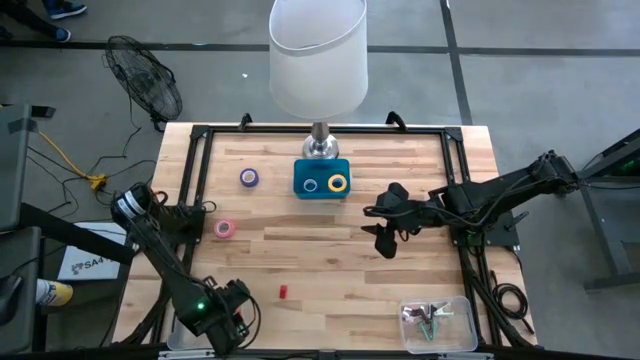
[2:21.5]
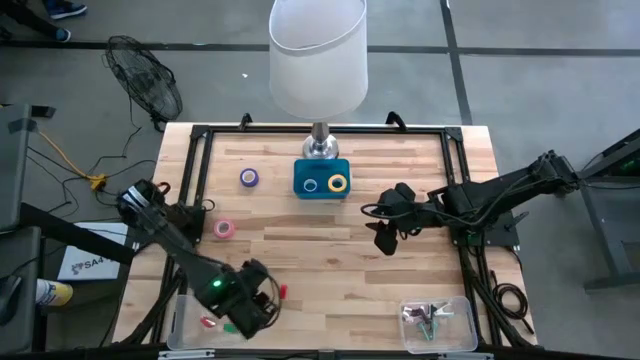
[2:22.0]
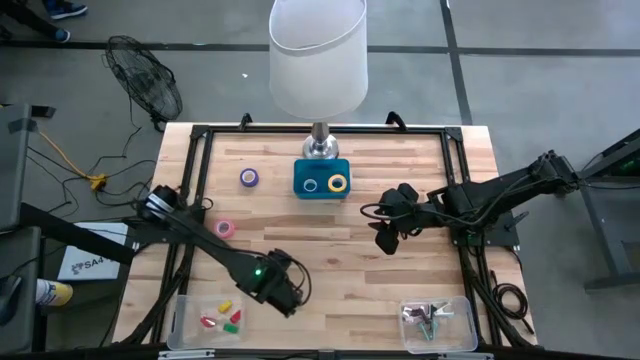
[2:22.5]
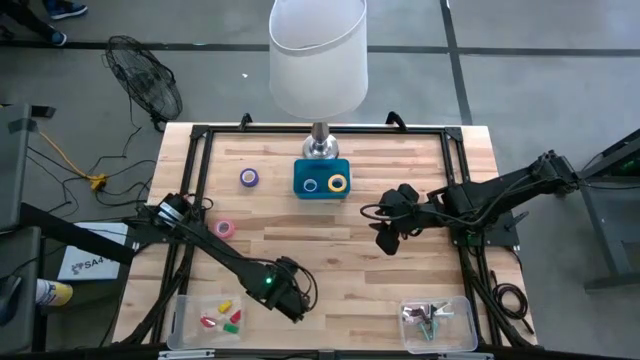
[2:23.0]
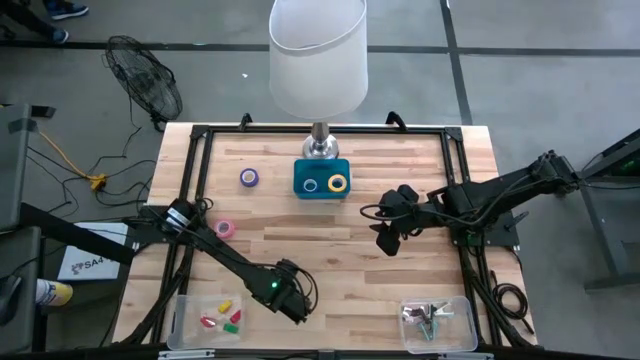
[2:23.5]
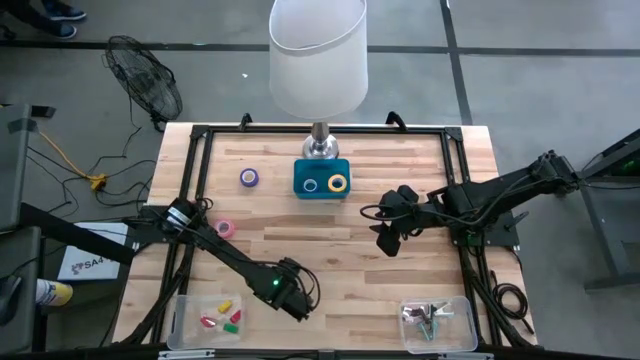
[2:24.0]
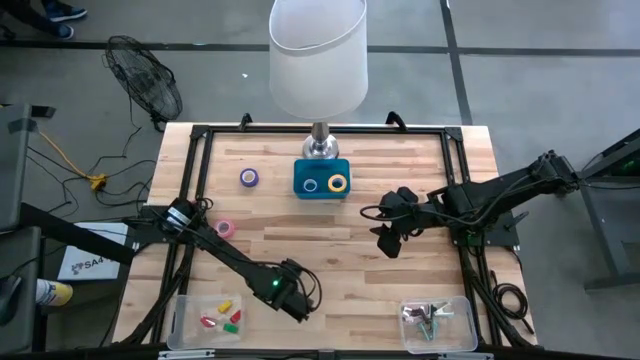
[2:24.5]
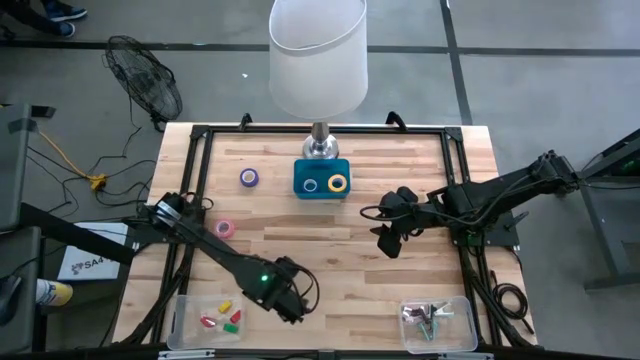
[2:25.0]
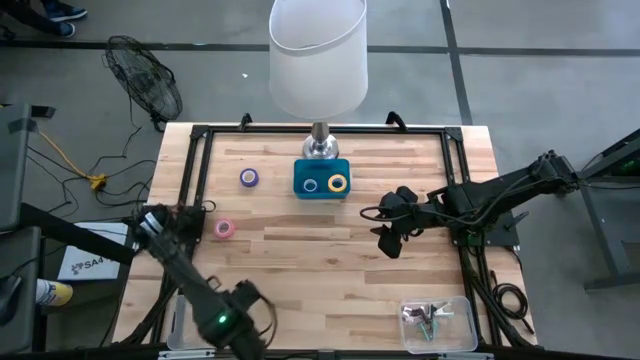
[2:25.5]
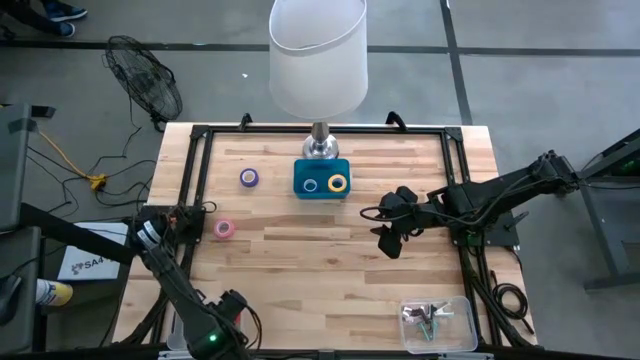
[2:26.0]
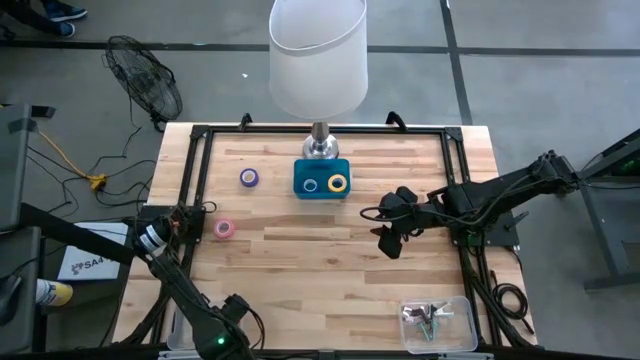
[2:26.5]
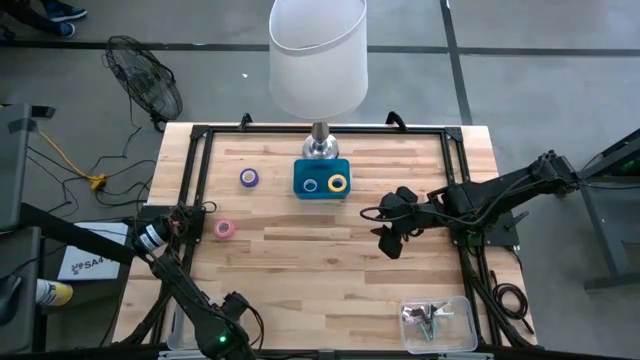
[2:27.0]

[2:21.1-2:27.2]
Task: Pick and place Stapler, Stapler remover, tape
Put the red stapler into the left transparent bin

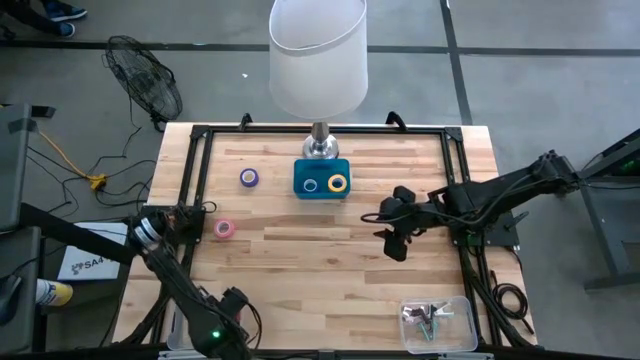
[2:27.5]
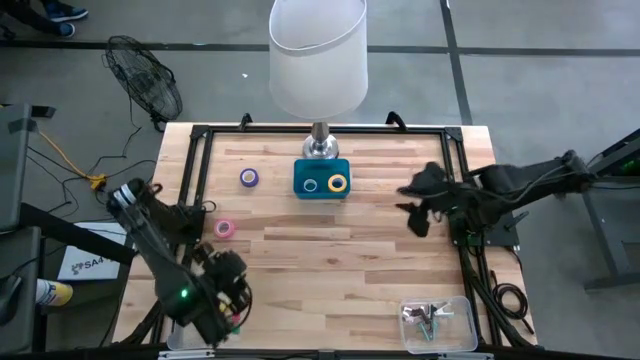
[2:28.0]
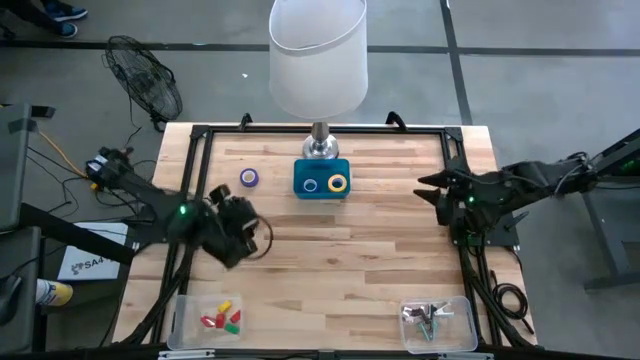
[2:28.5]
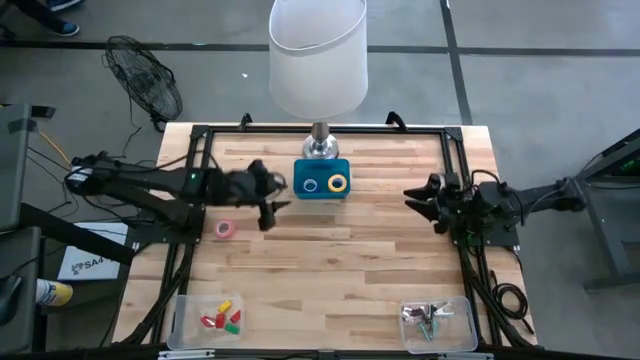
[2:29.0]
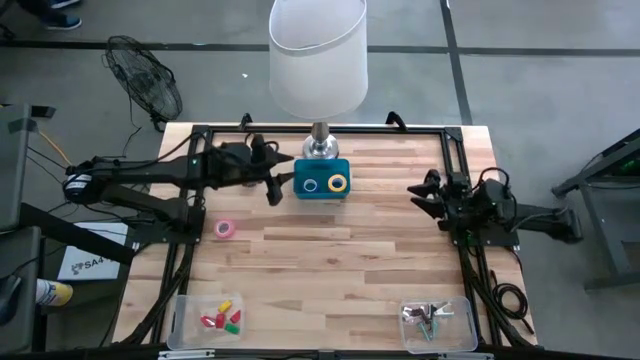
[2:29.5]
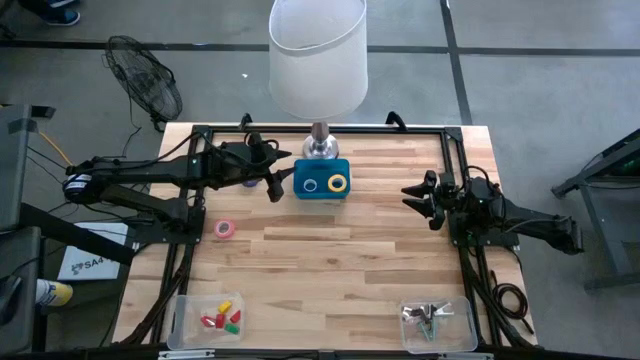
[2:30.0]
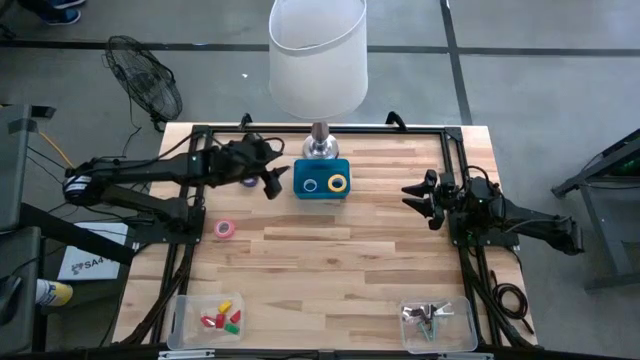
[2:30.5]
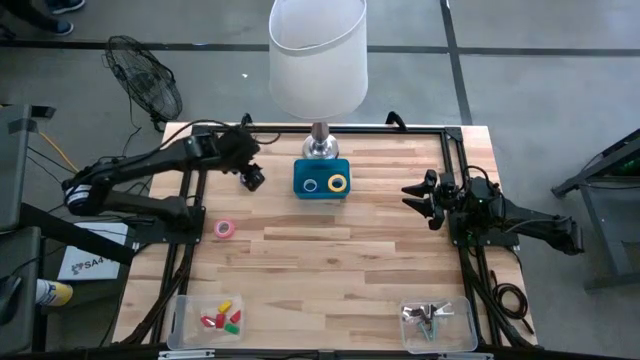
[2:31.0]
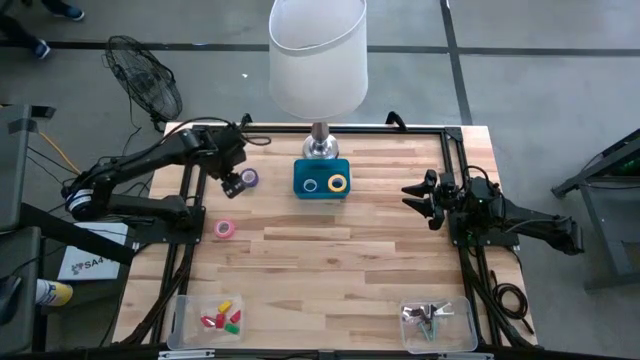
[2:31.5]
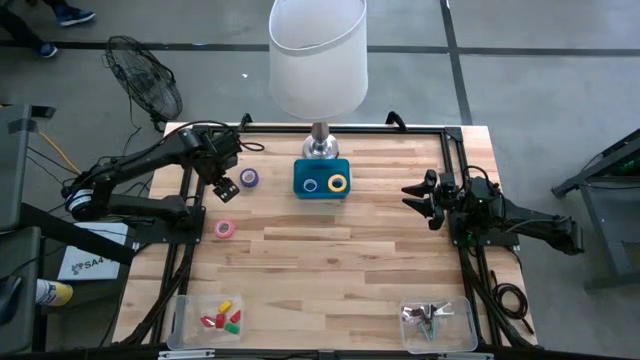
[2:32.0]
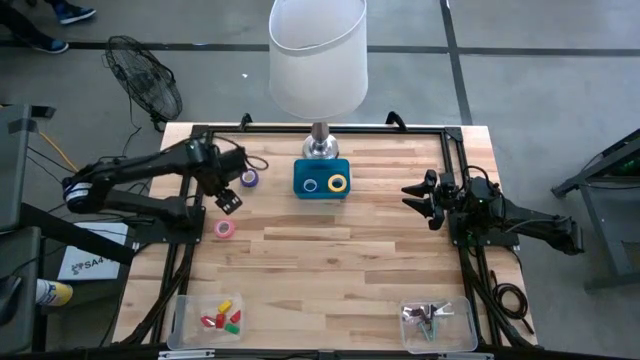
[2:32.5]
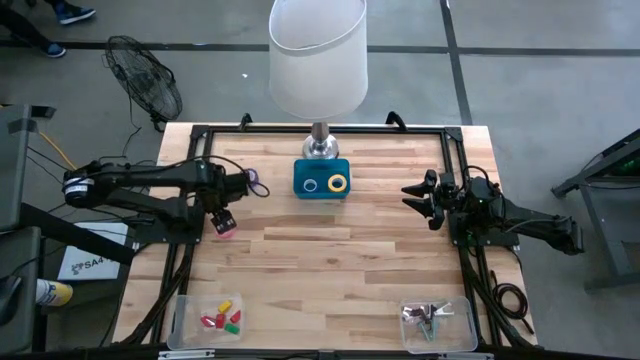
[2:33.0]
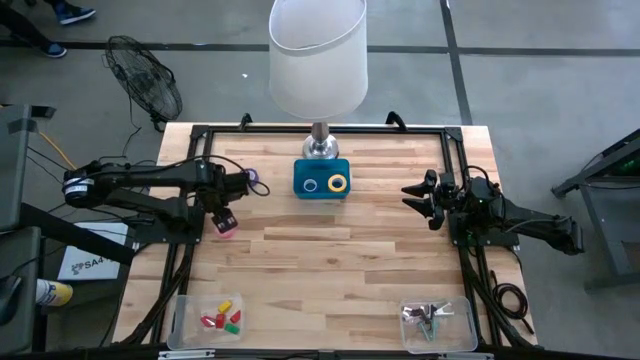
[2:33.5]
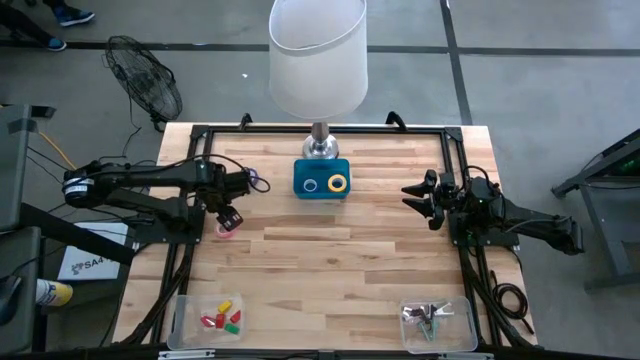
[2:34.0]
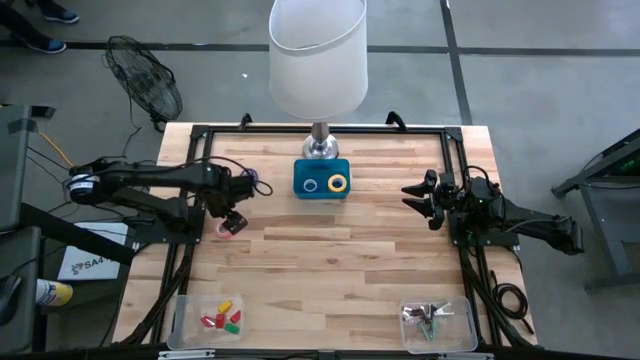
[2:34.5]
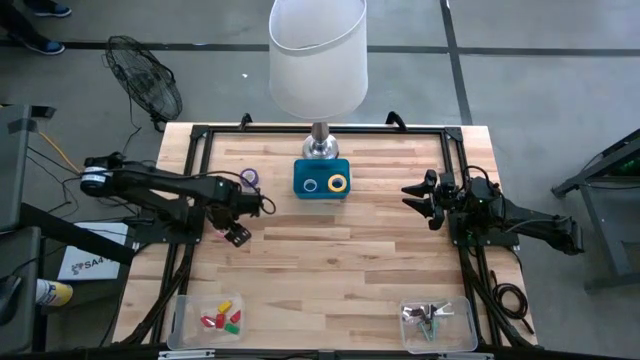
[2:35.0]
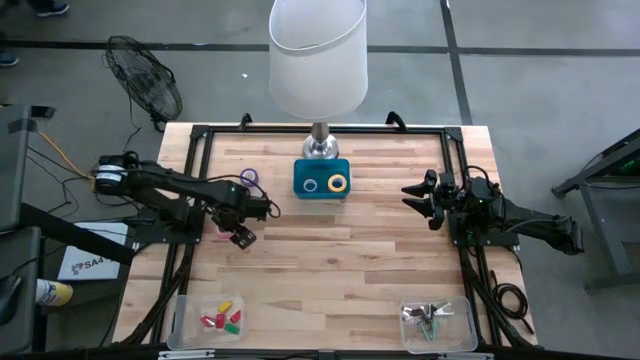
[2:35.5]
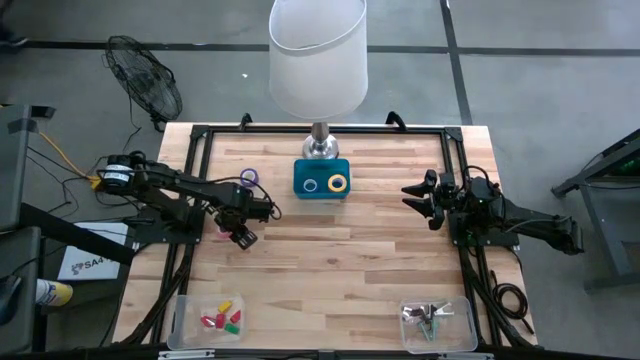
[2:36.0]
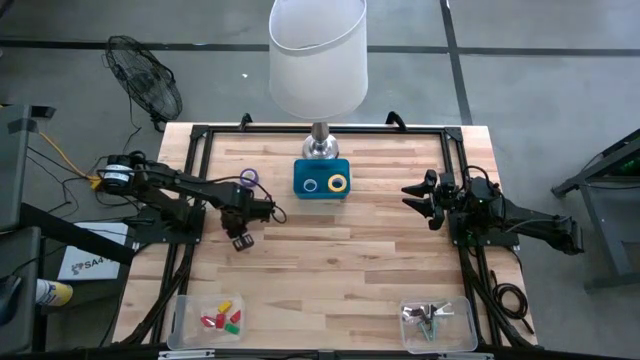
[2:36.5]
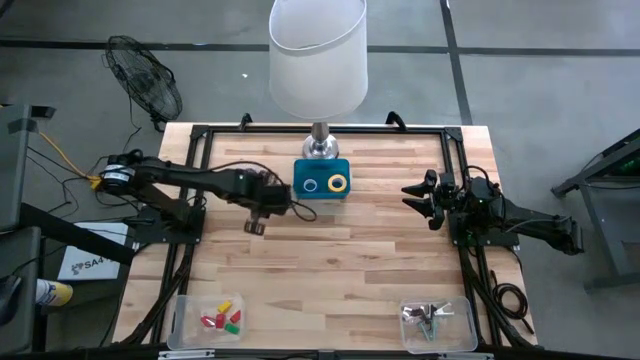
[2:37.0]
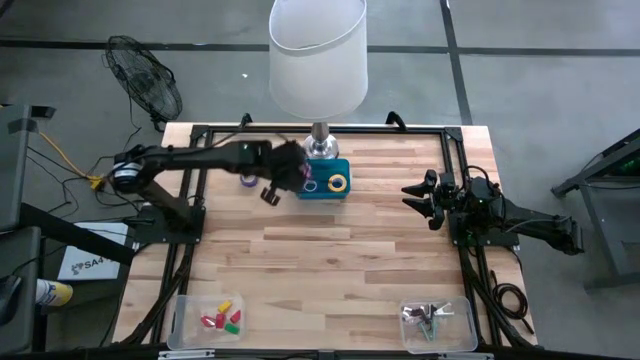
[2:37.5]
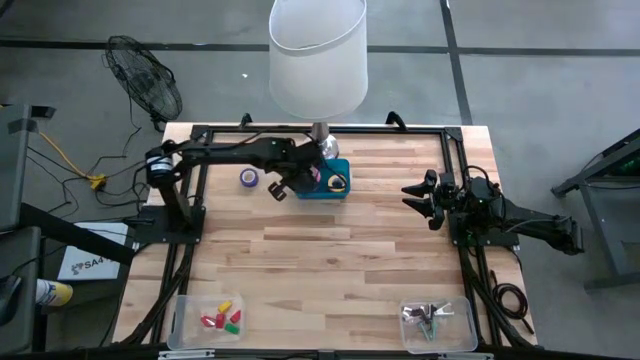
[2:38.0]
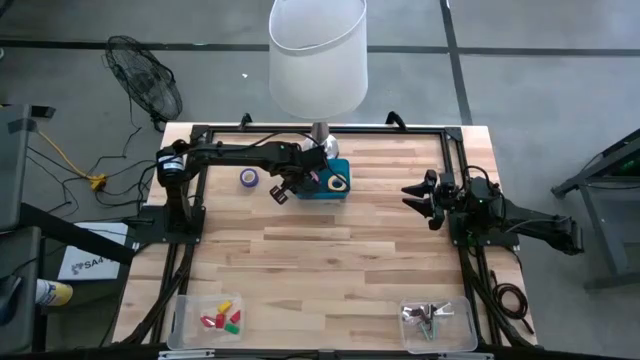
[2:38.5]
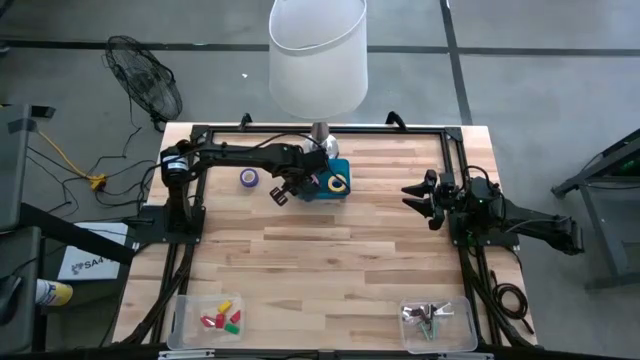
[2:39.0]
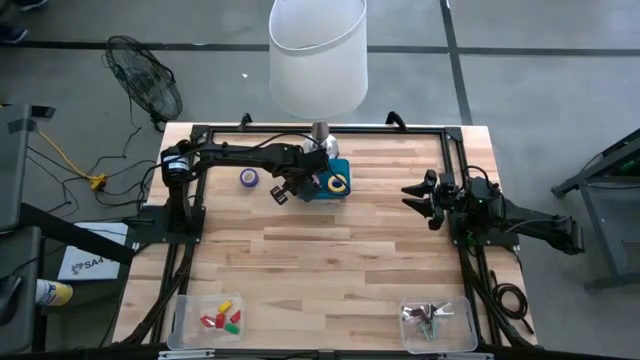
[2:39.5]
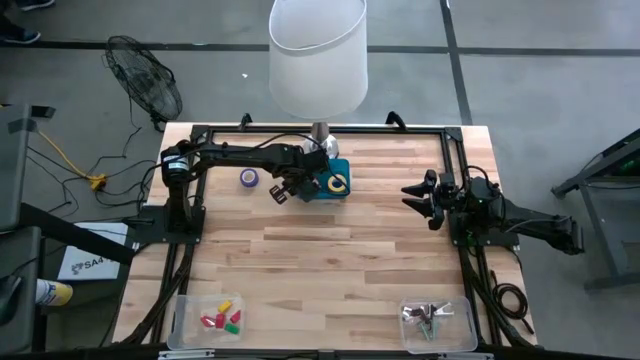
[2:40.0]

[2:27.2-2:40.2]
Put the pink tape into the blue bin
